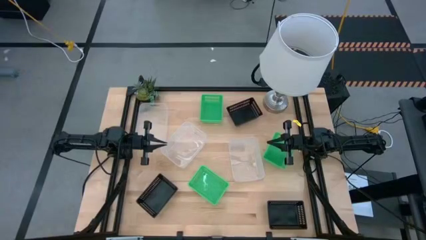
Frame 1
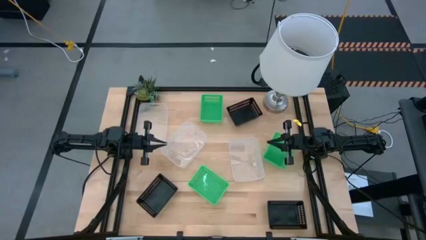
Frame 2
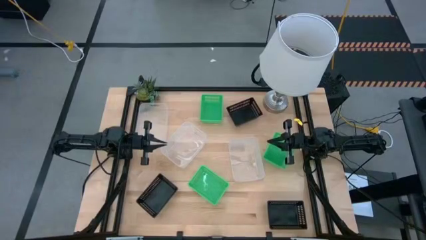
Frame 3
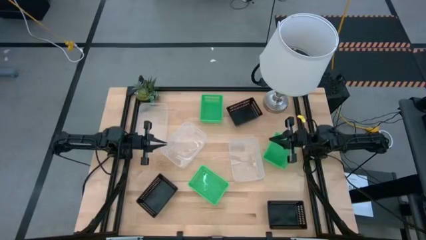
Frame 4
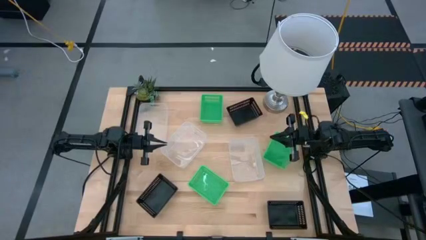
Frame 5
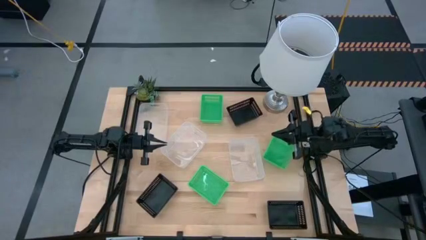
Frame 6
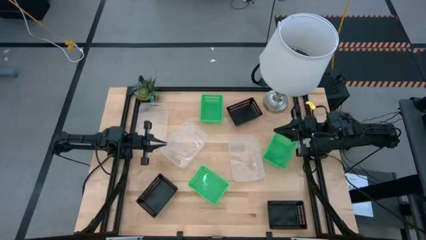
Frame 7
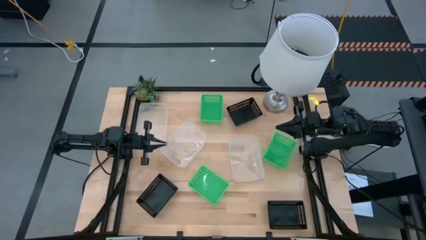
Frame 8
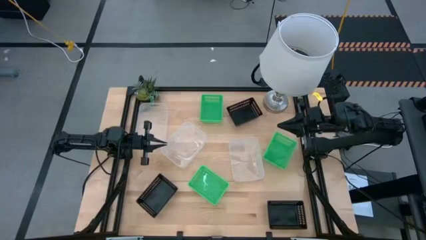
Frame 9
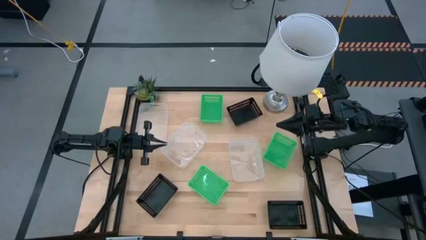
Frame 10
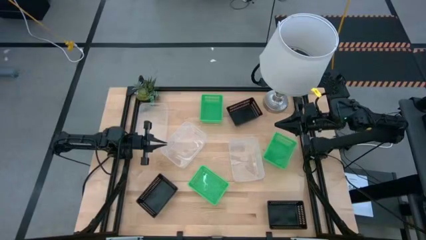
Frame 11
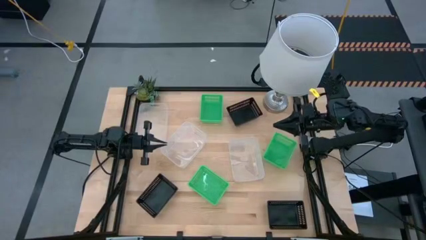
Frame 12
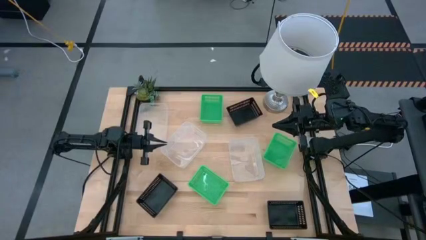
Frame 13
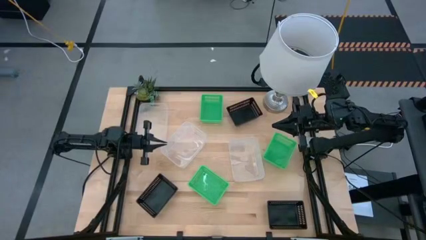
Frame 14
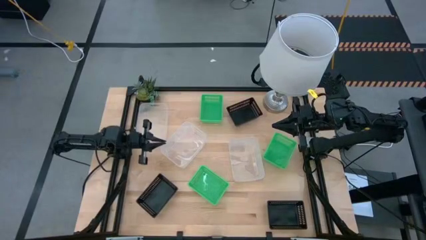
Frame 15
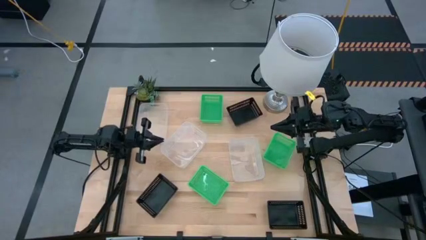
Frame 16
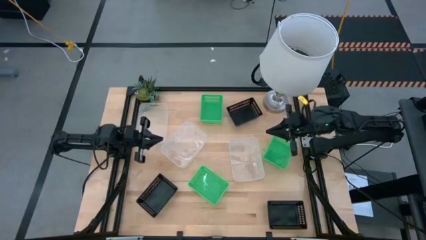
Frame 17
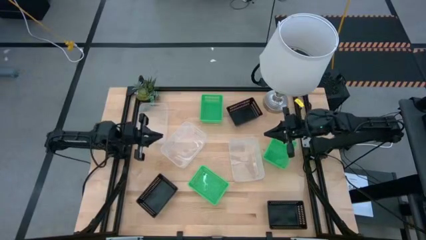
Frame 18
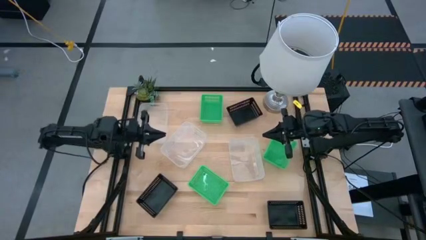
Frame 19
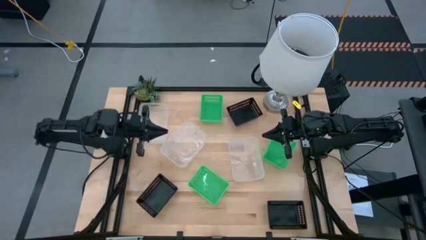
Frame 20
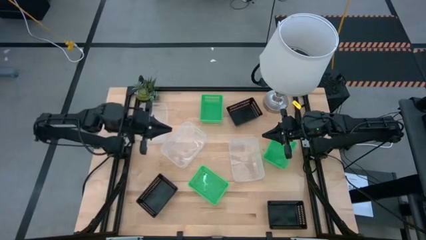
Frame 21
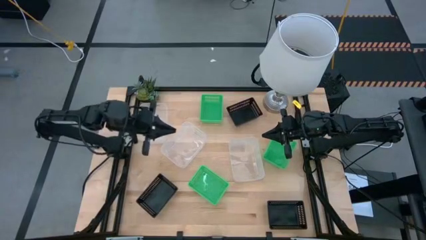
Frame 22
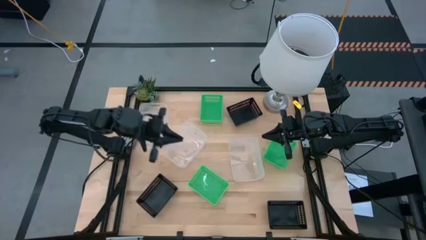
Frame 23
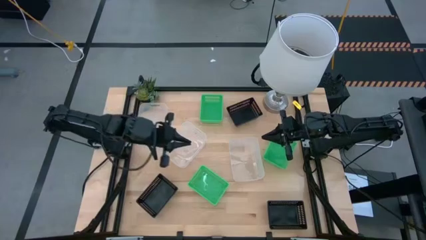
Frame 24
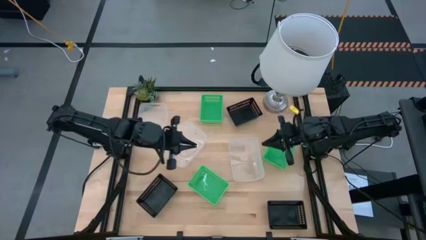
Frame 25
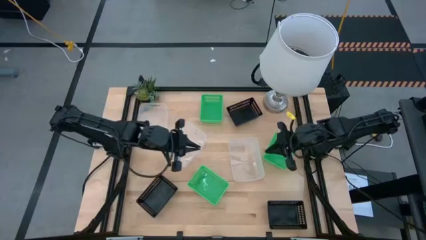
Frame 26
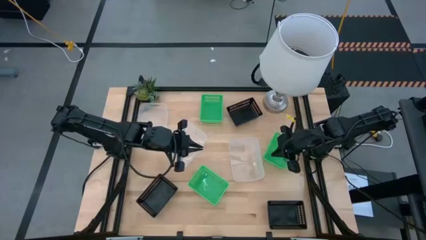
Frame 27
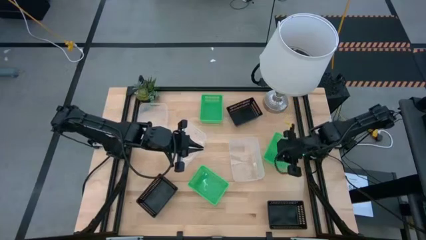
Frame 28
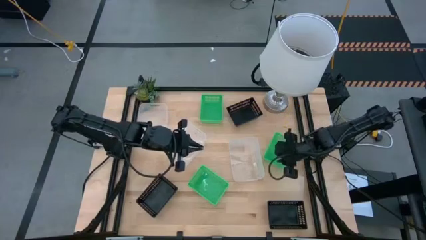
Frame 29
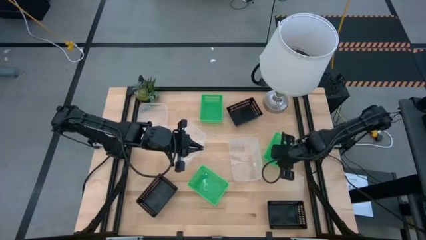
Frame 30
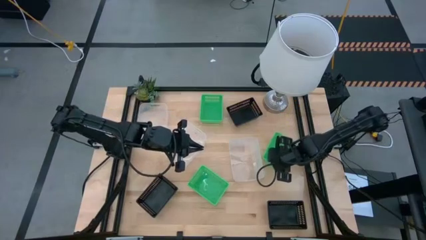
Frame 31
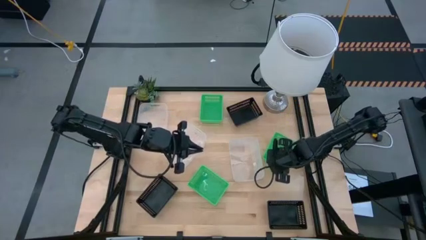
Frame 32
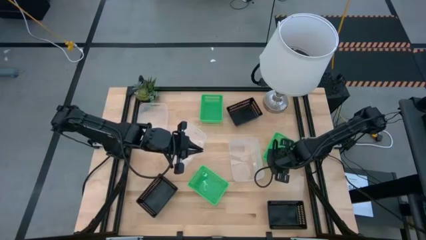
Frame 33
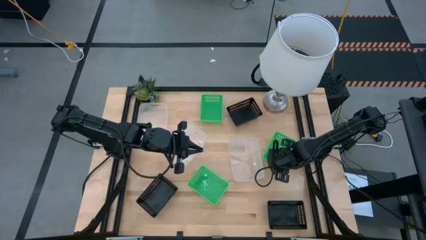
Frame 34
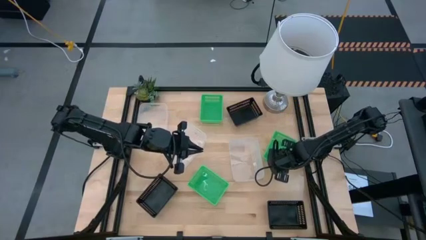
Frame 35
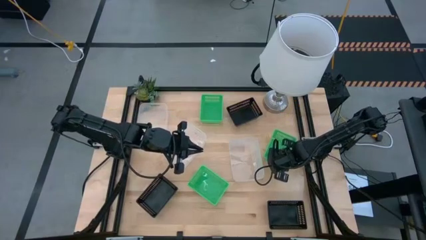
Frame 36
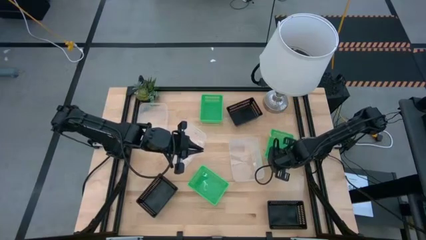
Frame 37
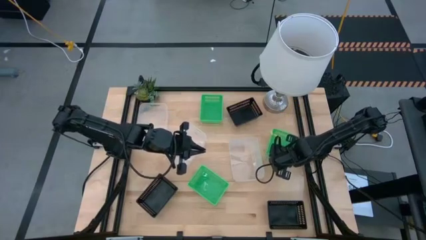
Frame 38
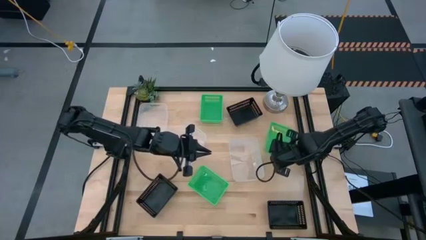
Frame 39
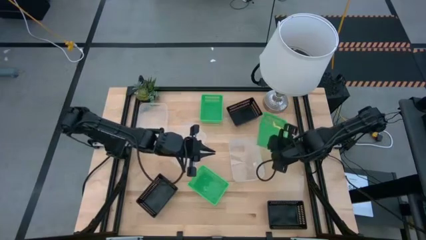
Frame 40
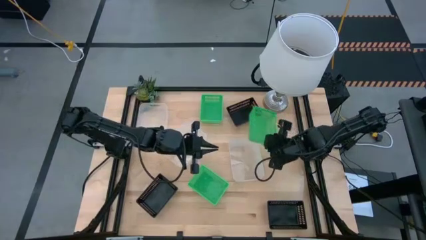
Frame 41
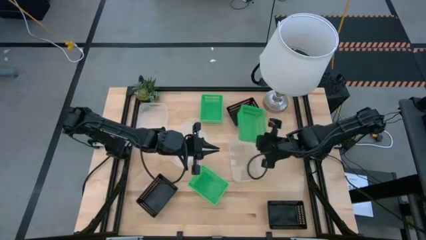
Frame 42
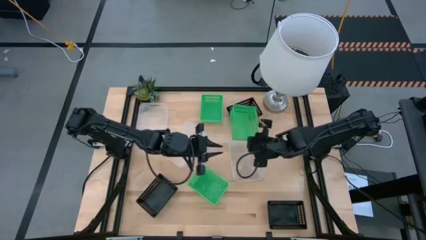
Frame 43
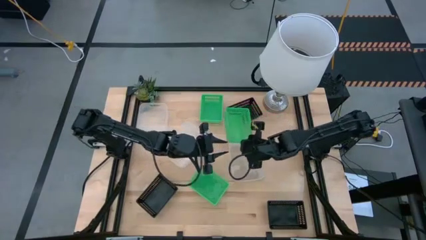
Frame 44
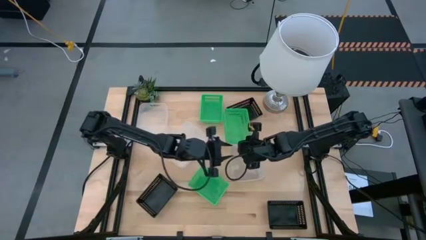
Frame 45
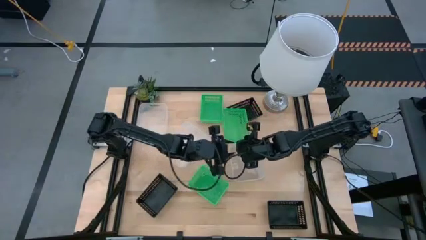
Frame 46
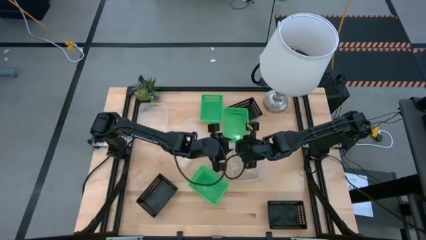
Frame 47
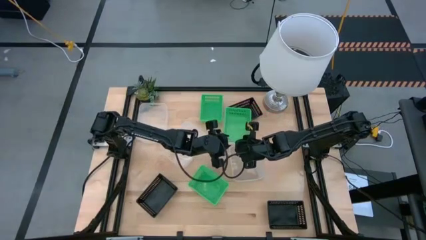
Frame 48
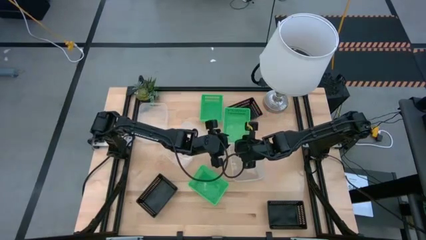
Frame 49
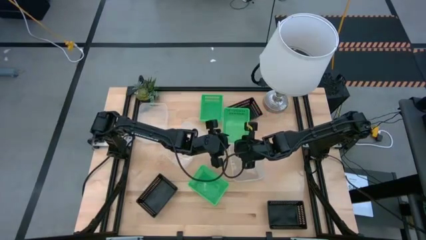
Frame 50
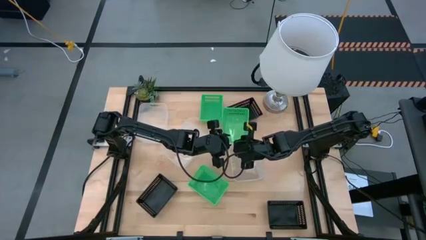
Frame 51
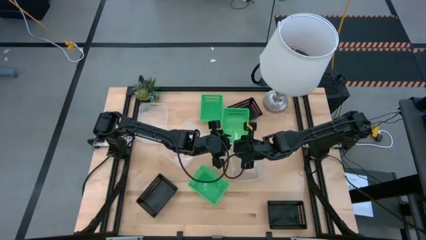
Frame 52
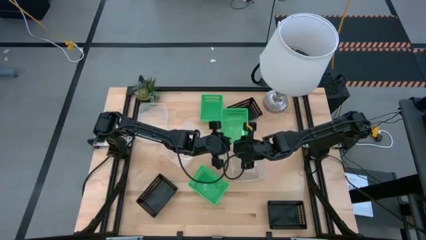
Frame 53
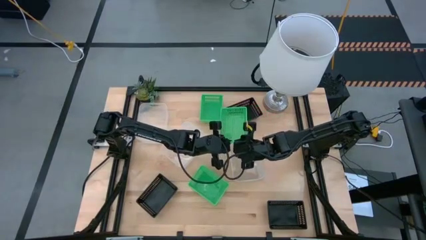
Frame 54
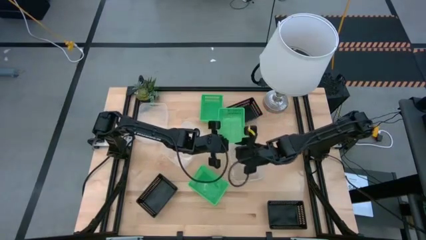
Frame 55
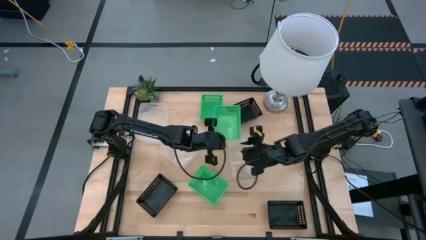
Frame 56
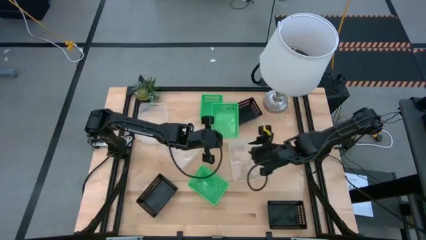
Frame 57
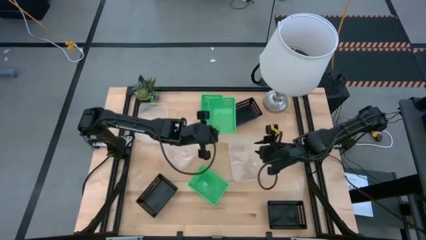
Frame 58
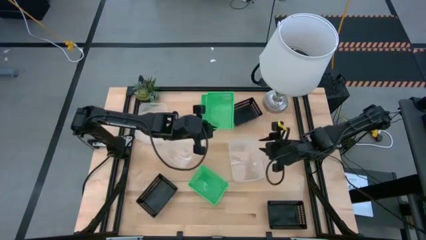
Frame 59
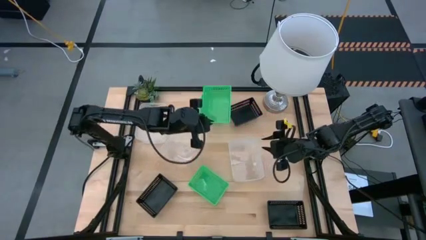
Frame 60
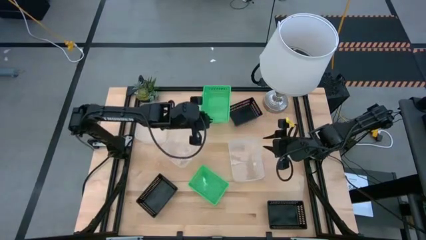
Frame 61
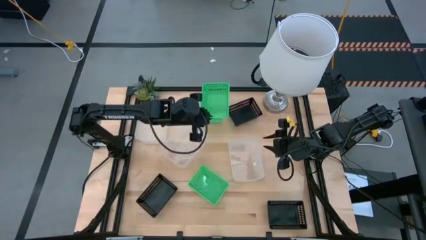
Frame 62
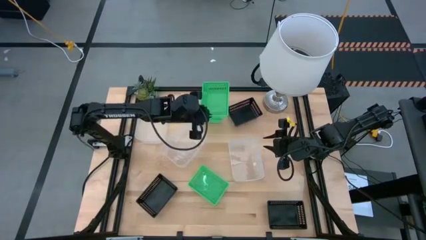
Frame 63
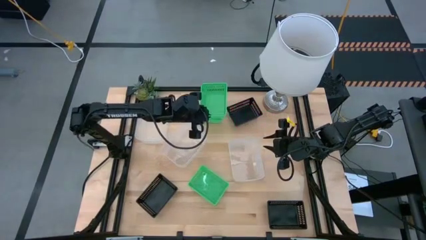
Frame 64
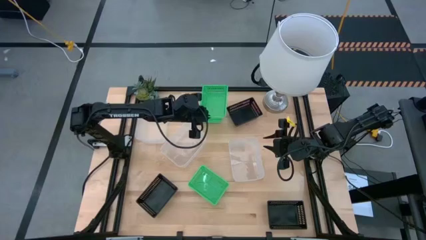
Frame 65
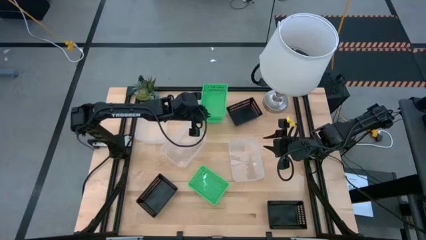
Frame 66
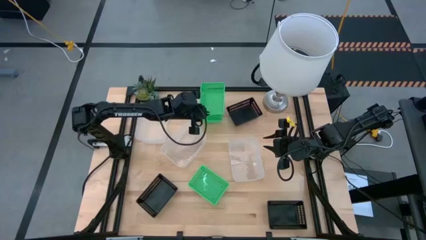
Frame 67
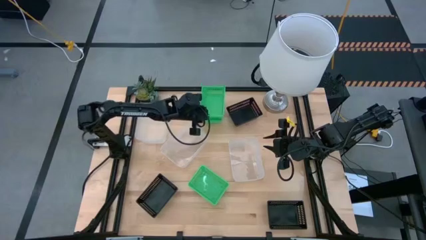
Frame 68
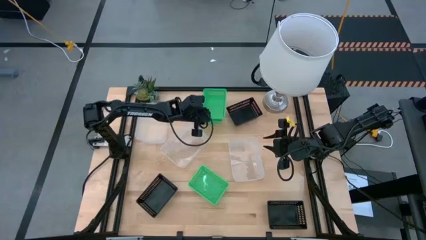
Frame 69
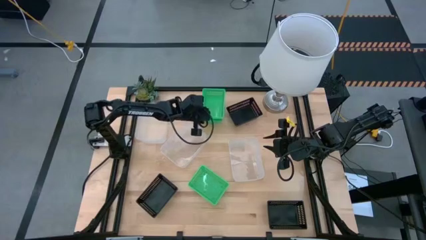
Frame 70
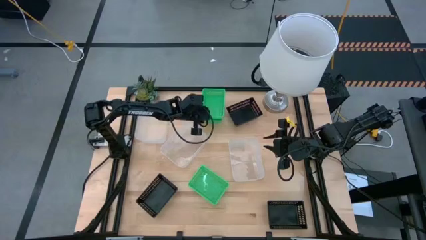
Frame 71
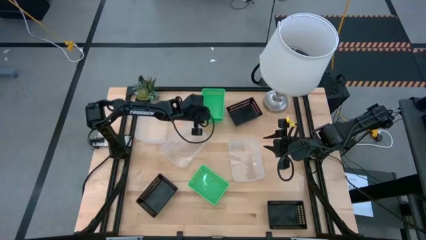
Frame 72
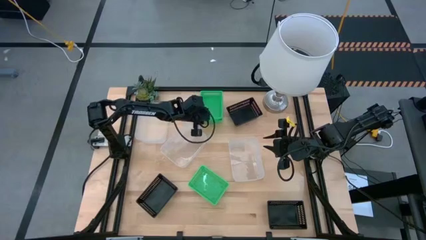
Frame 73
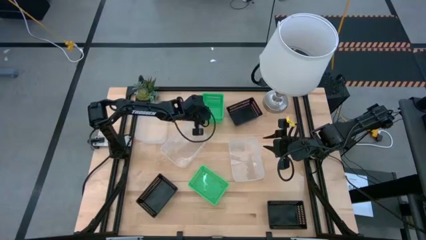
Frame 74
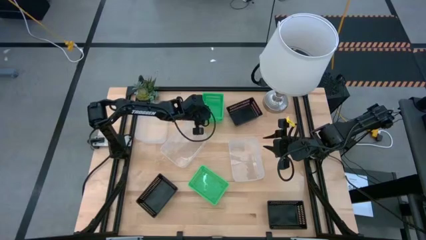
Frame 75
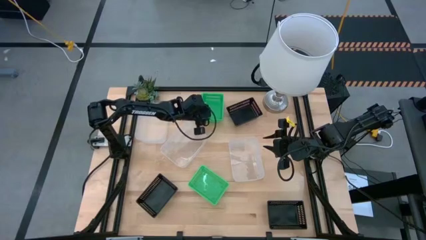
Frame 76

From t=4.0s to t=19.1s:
Stack the middle green bin on top of the top green bin
